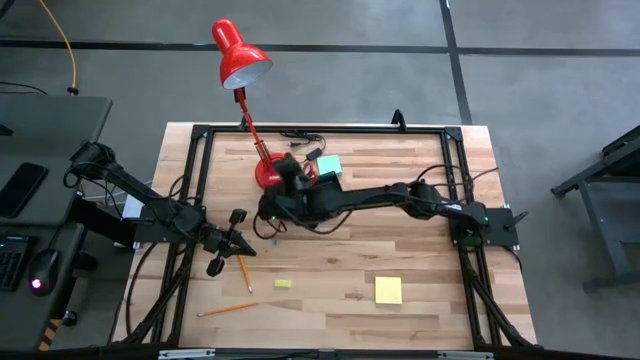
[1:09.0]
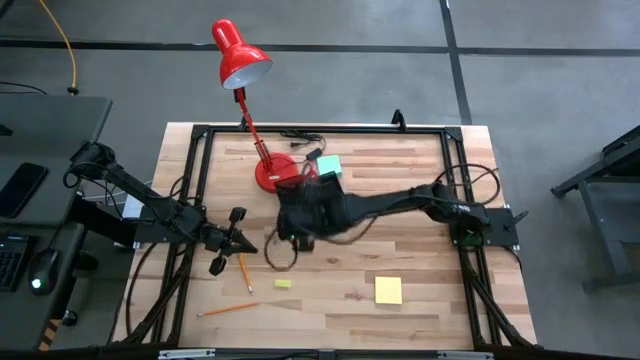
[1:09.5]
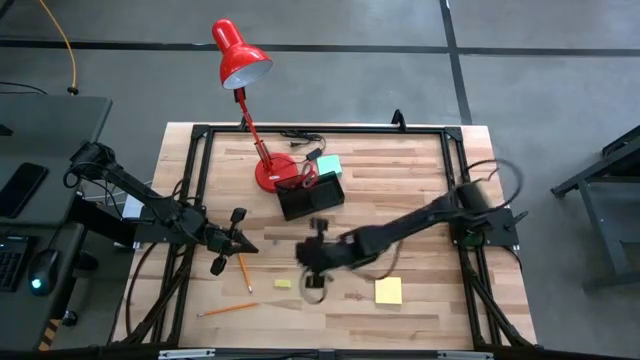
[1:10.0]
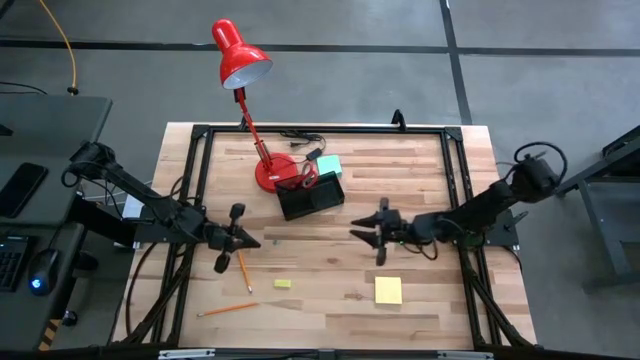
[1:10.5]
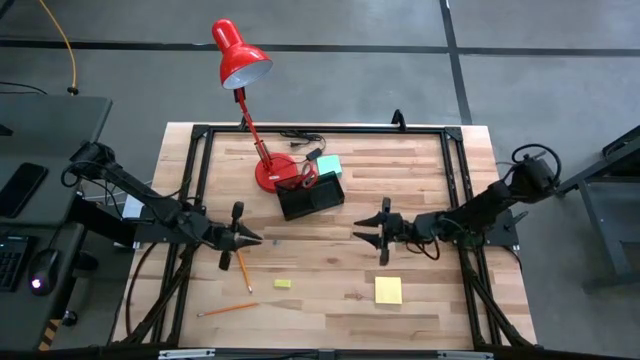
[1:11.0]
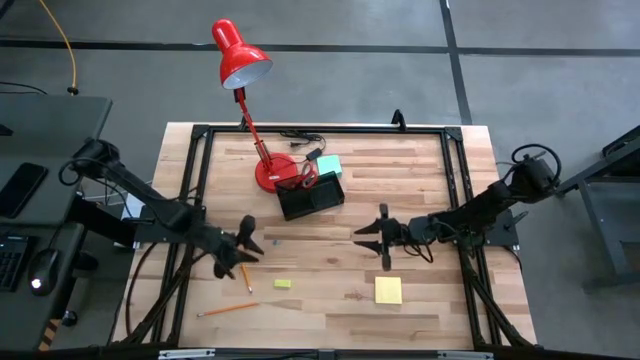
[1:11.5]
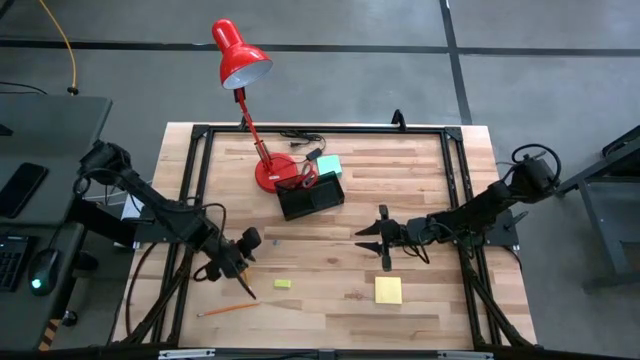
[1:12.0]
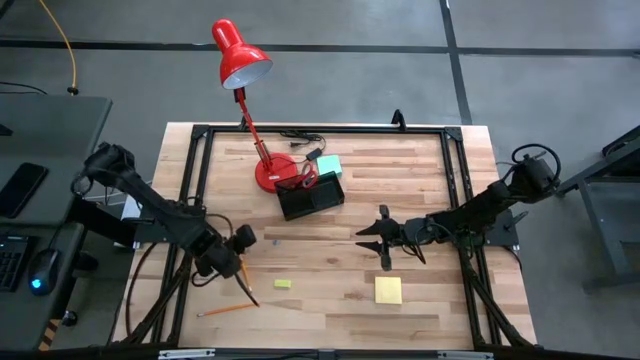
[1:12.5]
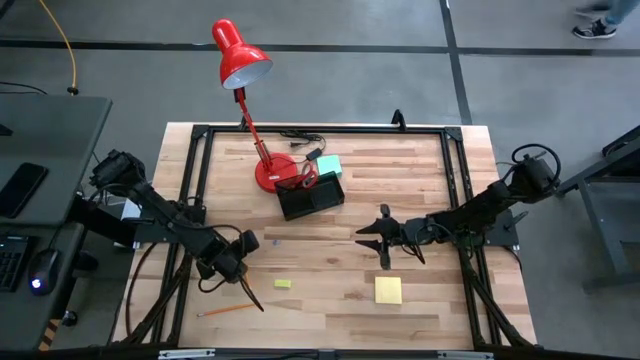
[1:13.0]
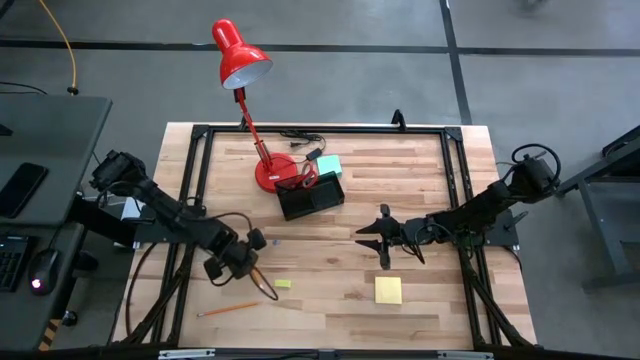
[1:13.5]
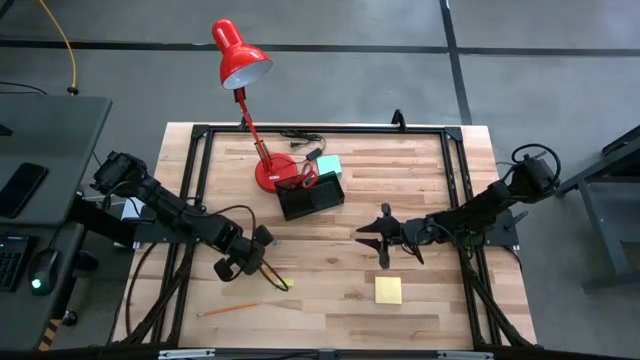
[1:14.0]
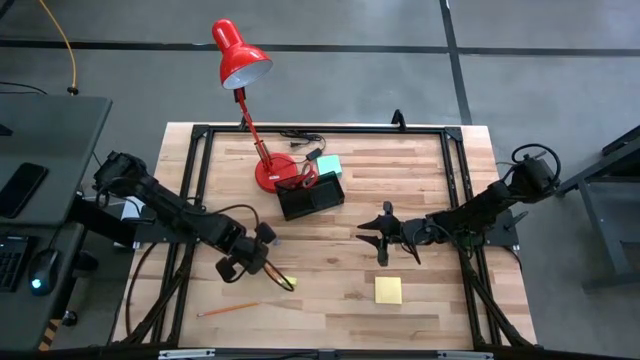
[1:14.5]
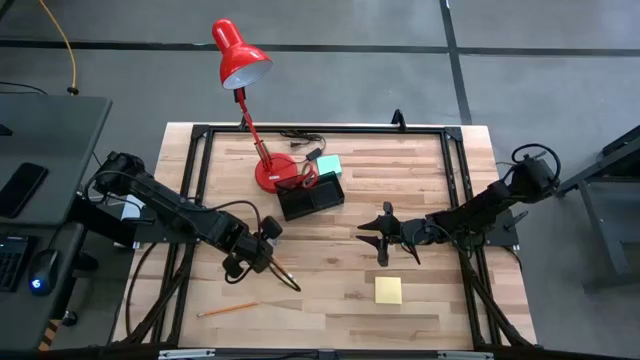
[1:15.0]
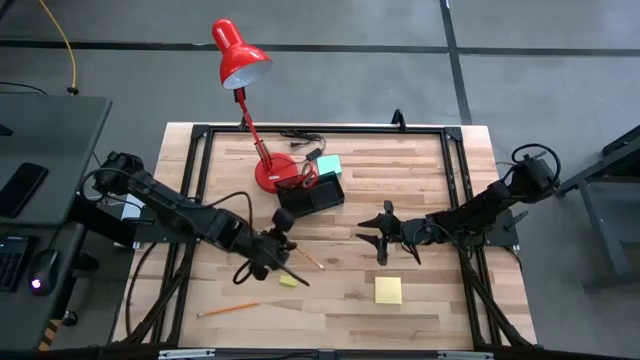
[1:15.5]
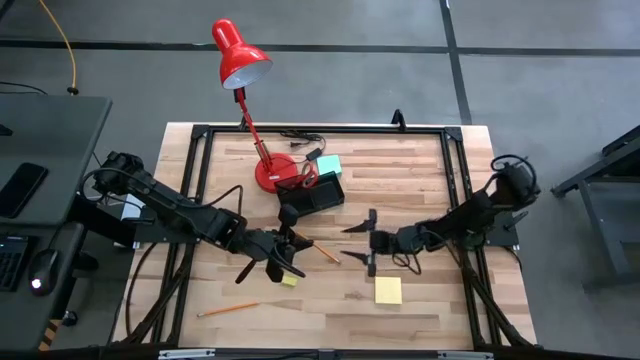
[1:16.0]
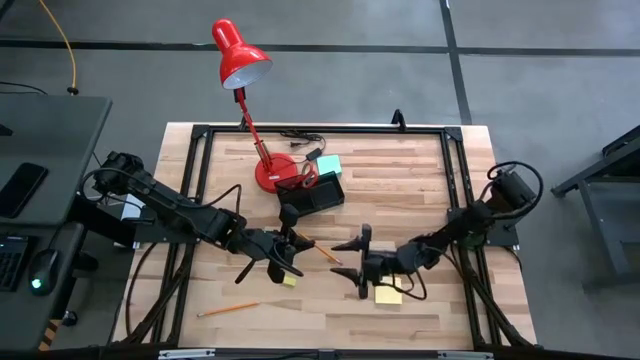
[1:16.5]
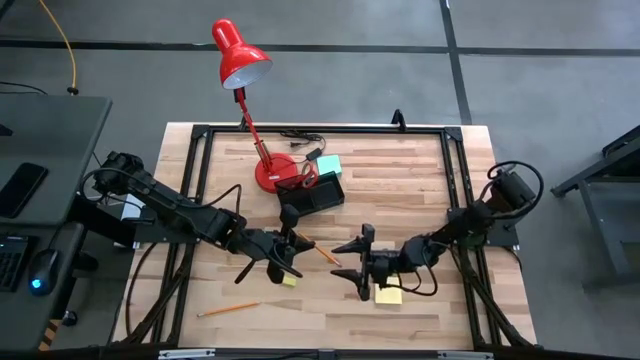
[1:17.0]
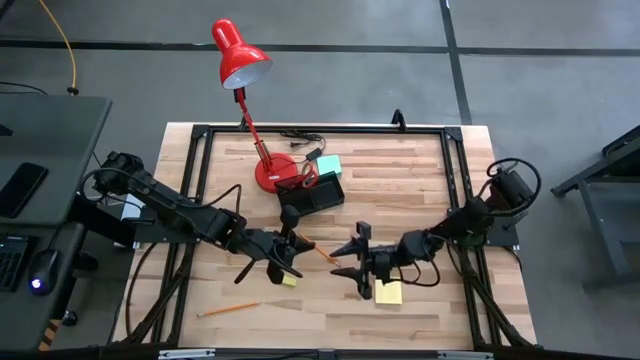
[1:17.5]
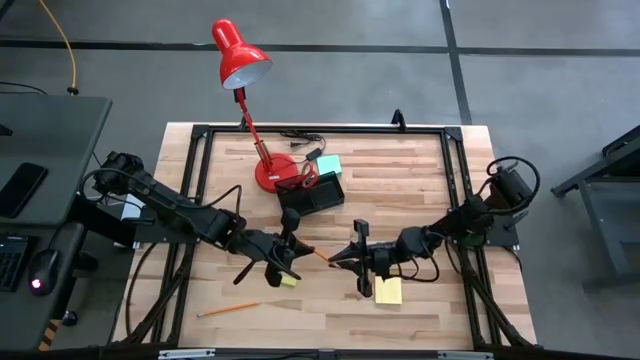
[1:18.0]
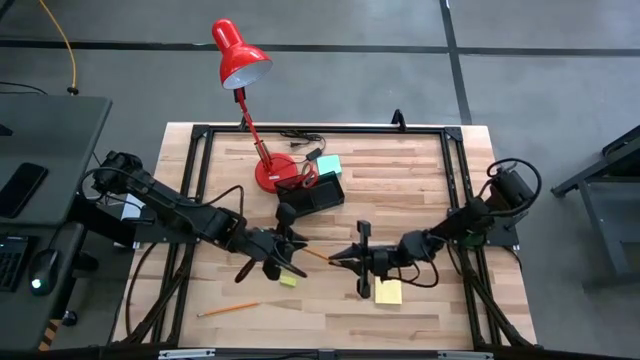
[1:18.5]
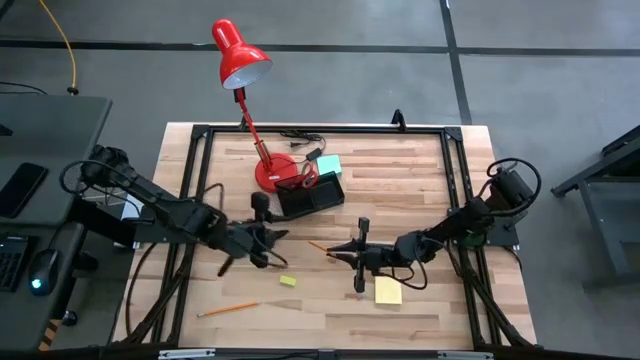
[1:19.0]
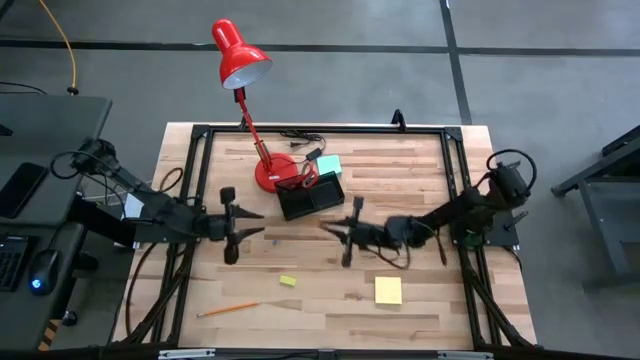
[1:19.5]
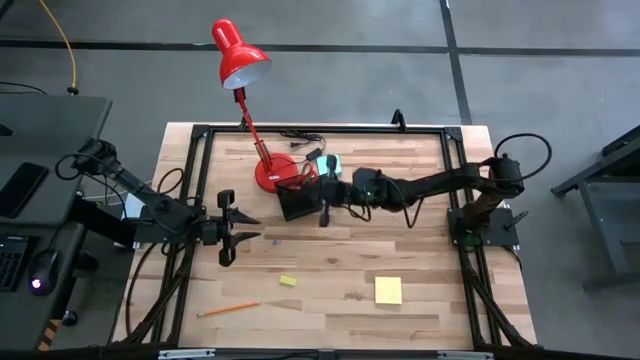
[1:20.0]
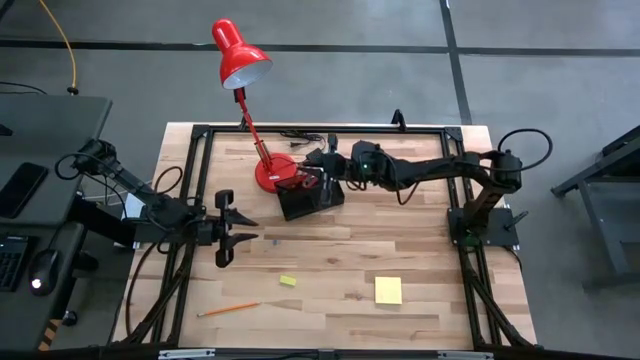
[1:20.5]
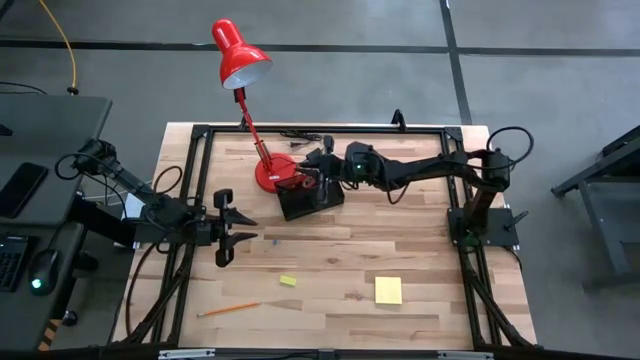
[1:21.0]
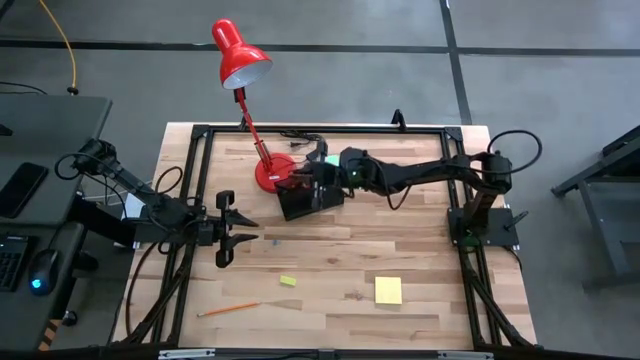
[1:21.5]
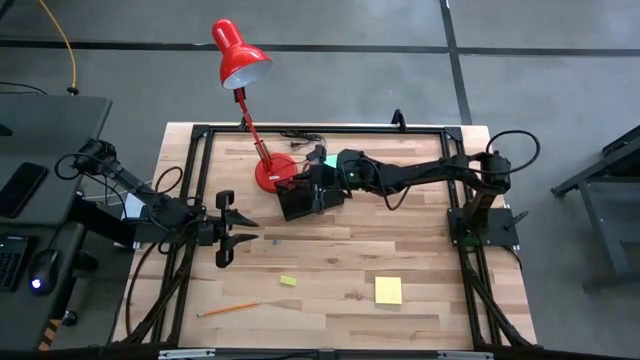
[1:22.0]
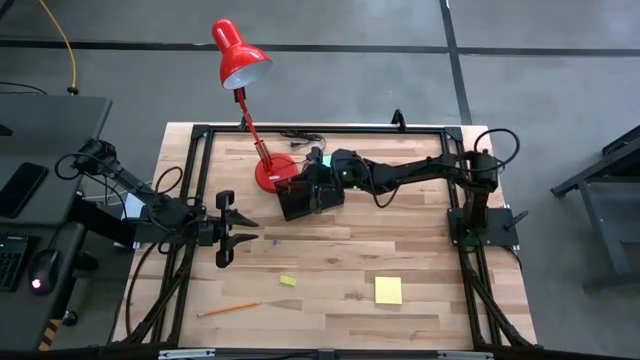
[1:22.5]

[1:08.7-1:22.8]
Task: Pick and place office supplies into organizer
Put the top orange pencil into the desk organizer

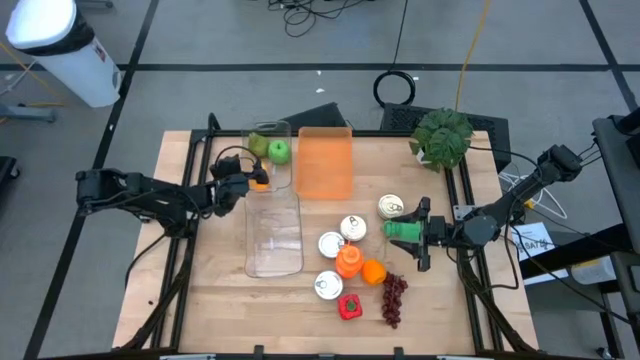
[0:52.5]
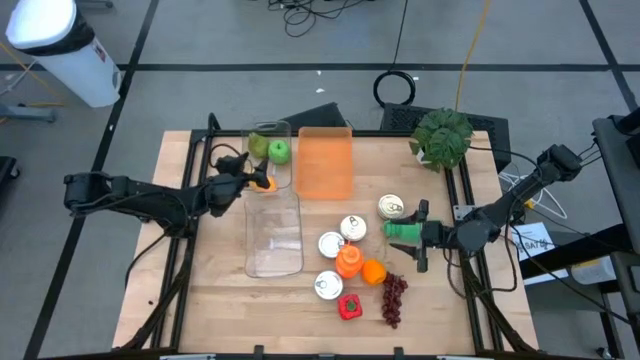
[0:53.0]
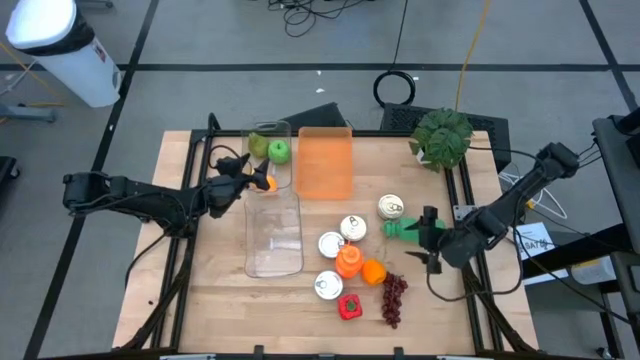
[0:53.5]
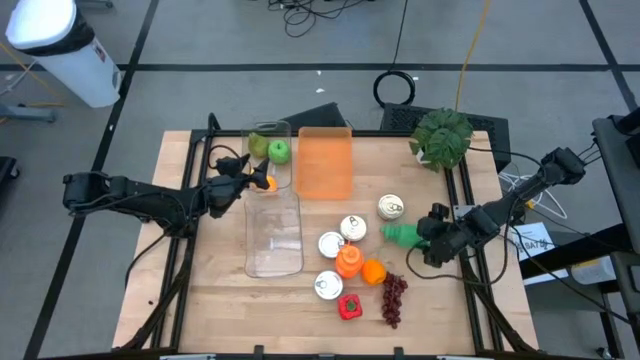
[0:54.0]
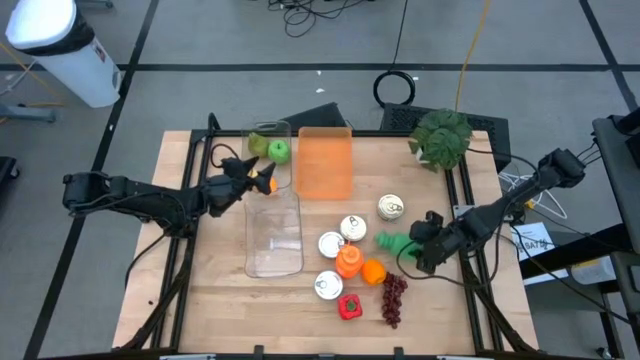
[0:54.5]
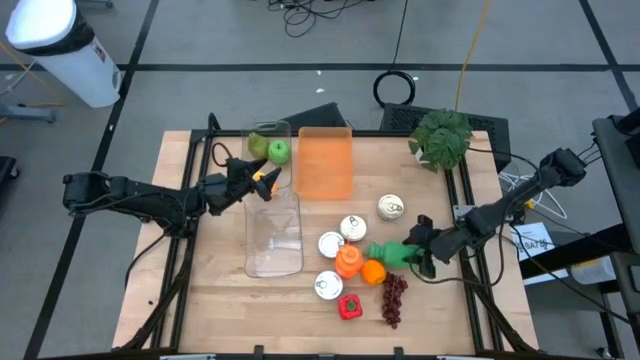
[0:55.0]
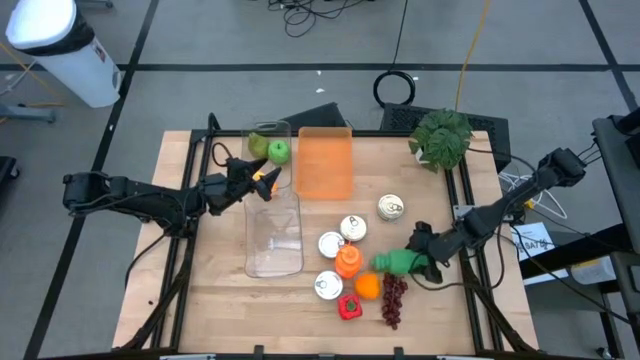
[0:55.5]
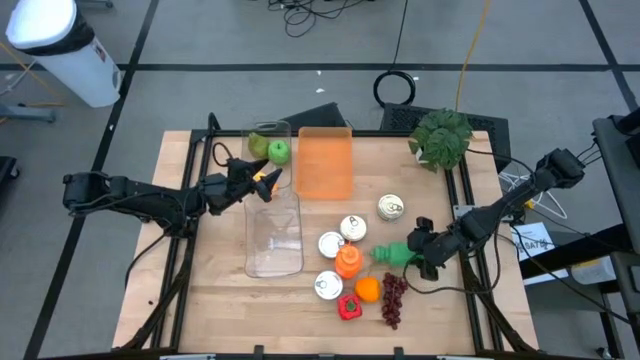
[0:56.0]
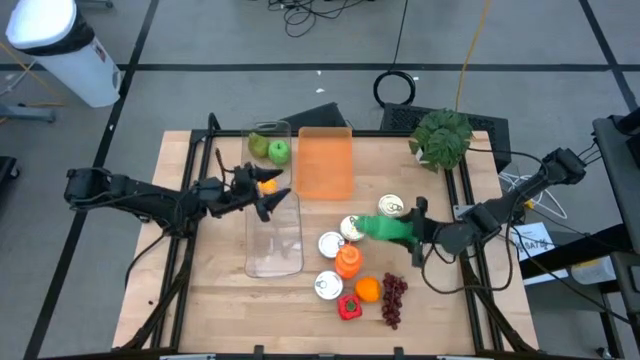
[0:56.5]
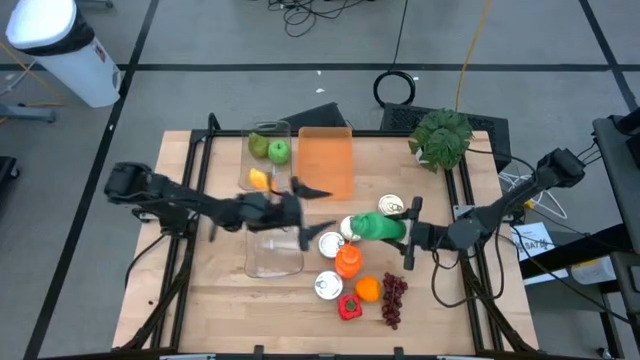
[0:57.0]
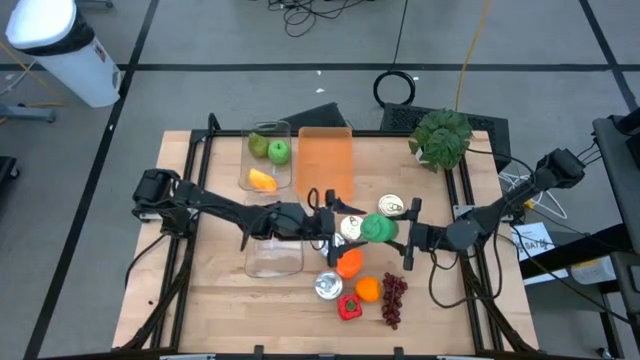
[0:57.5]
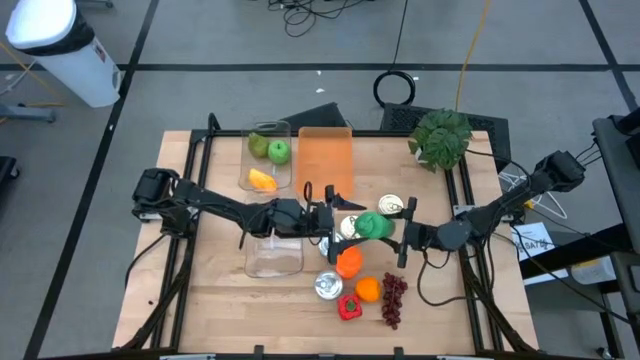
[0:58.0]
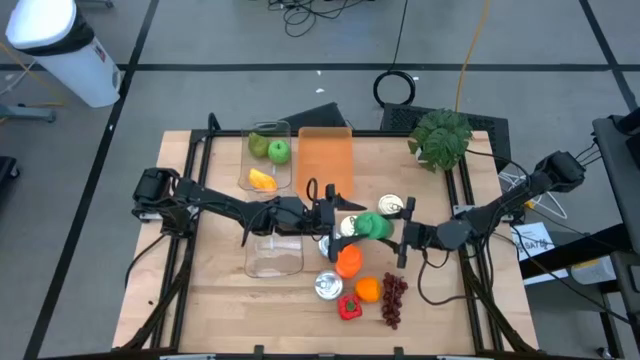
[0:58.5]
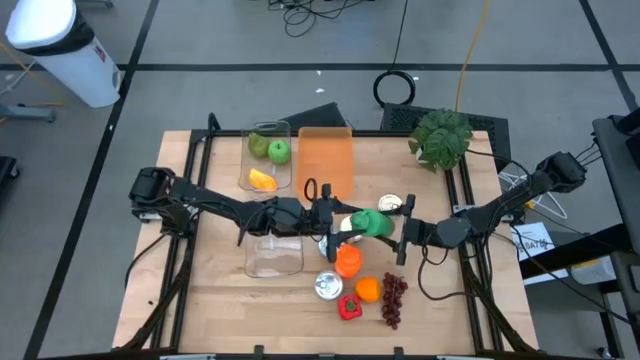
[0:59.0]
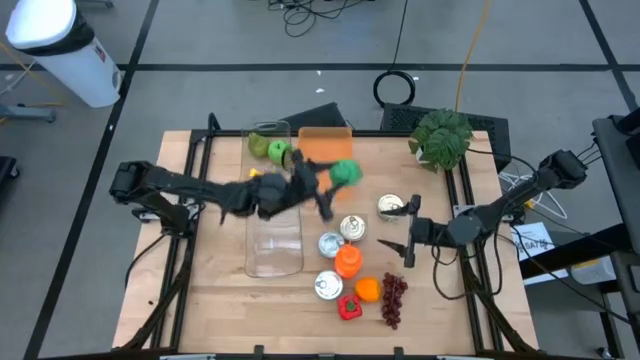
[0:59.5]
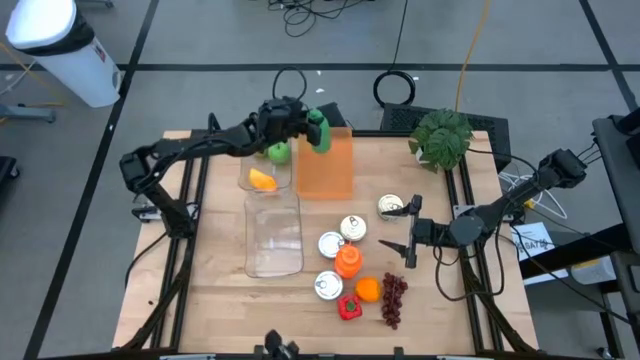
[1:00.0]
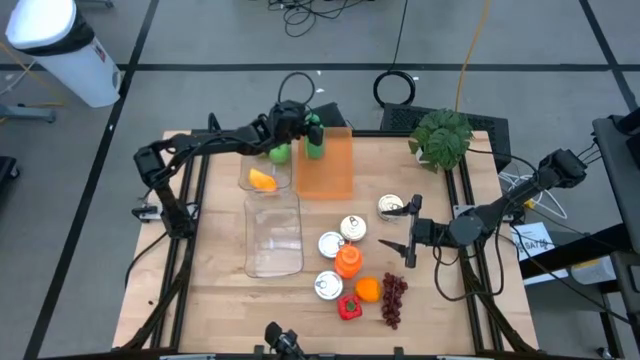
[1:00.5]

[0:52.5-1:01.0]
Task: Pick & Place Food Item
Put the green water bottle into the orange bin
